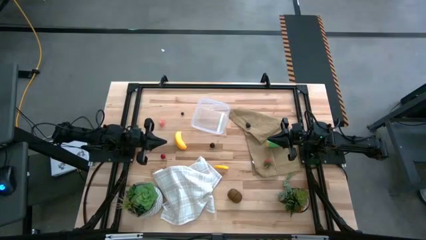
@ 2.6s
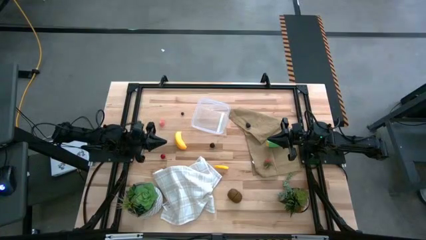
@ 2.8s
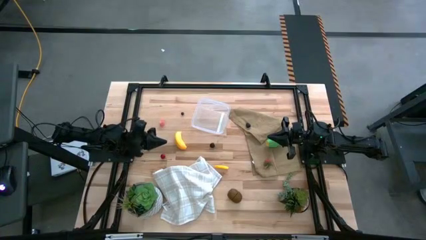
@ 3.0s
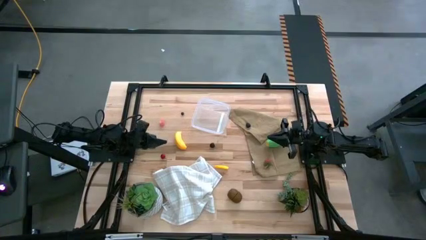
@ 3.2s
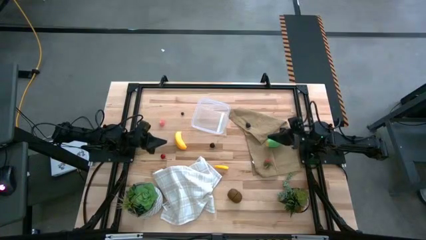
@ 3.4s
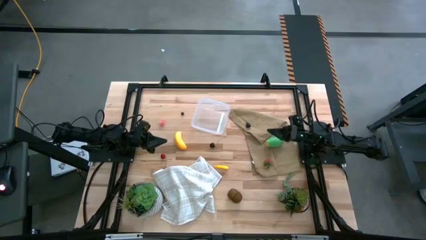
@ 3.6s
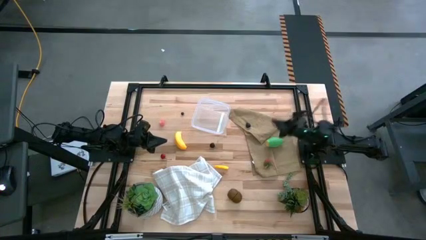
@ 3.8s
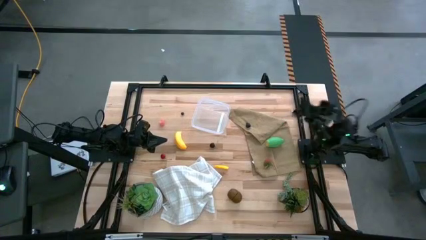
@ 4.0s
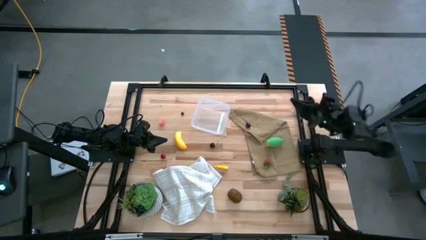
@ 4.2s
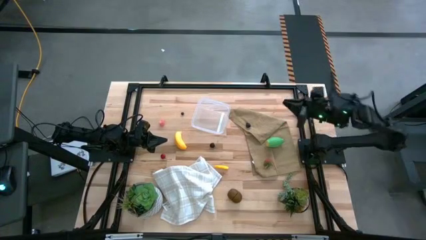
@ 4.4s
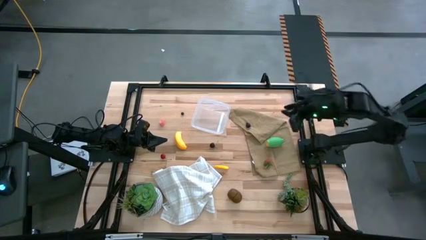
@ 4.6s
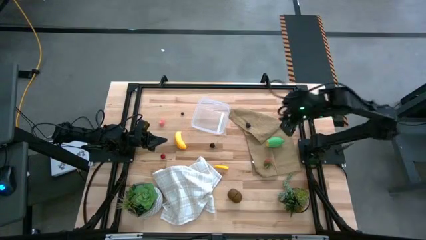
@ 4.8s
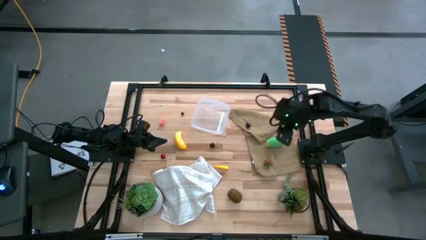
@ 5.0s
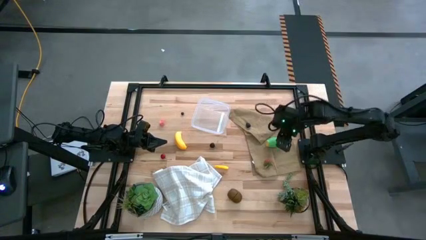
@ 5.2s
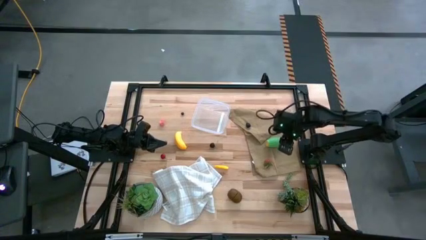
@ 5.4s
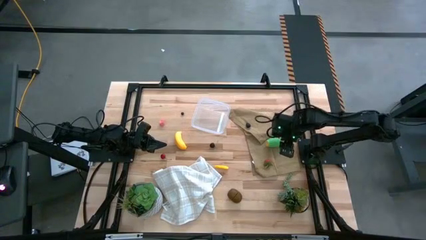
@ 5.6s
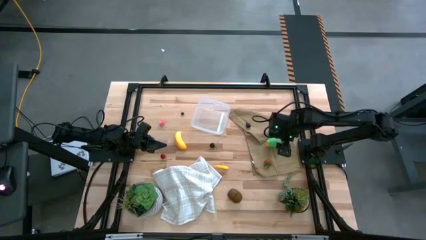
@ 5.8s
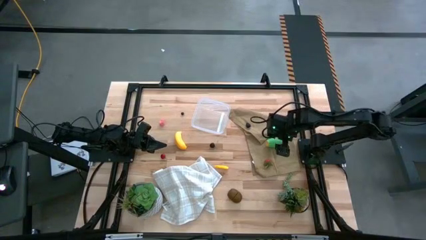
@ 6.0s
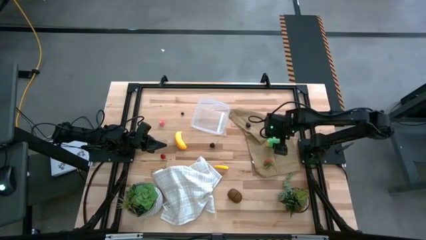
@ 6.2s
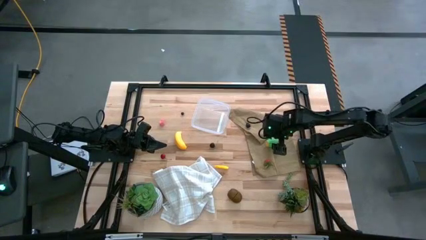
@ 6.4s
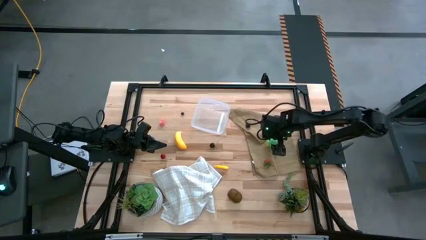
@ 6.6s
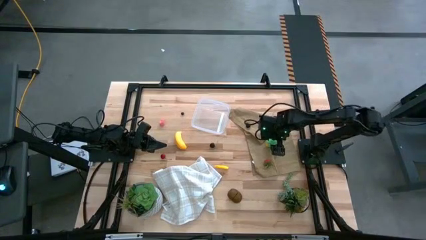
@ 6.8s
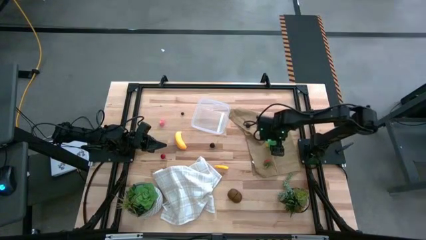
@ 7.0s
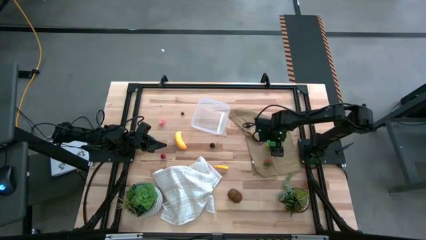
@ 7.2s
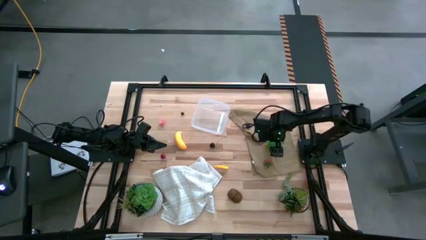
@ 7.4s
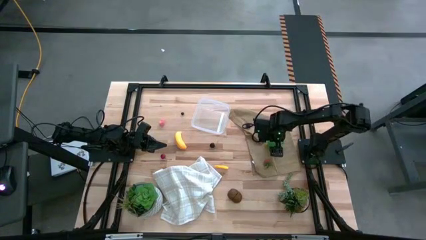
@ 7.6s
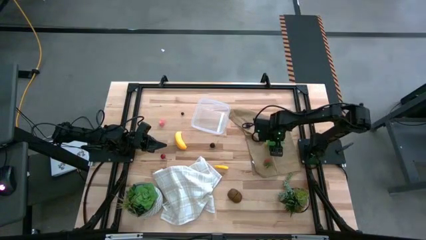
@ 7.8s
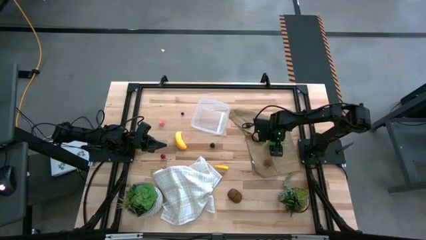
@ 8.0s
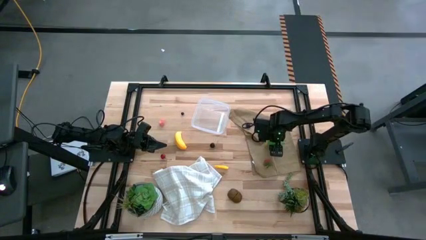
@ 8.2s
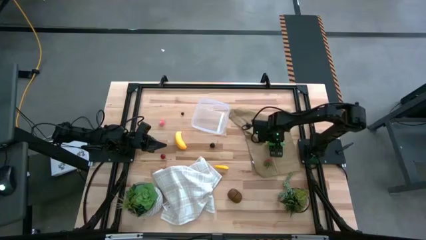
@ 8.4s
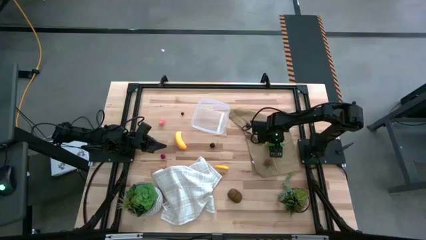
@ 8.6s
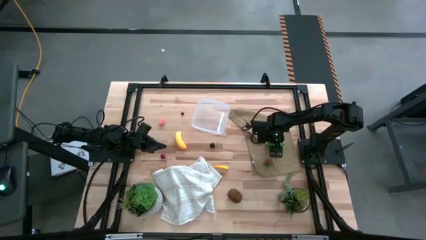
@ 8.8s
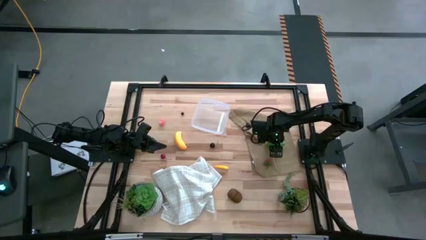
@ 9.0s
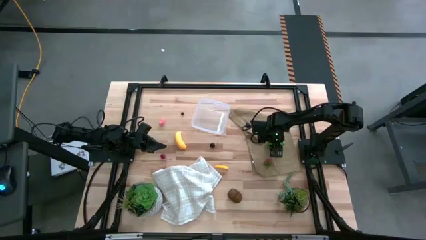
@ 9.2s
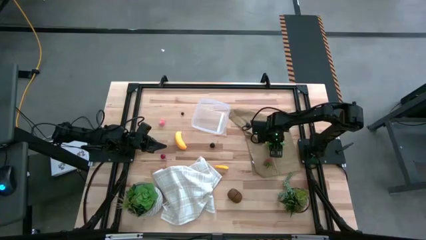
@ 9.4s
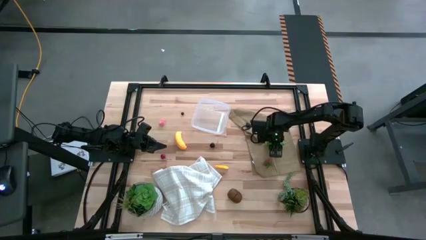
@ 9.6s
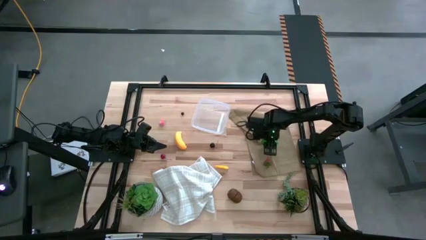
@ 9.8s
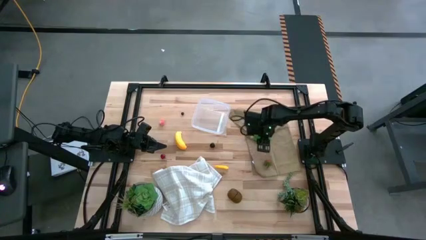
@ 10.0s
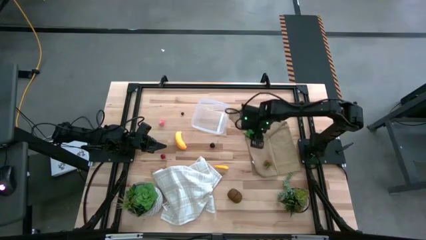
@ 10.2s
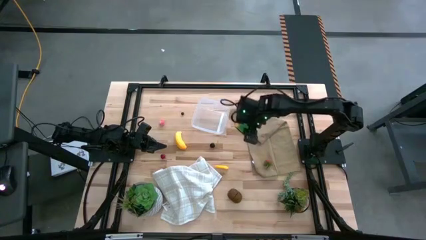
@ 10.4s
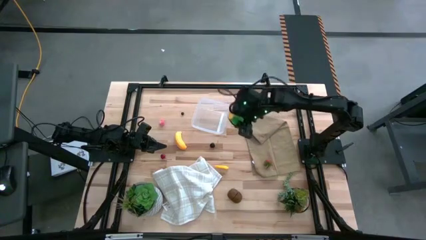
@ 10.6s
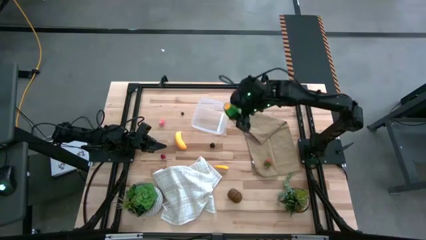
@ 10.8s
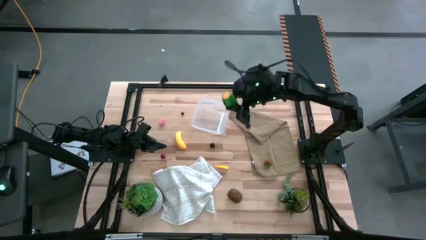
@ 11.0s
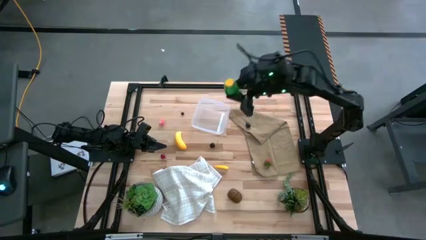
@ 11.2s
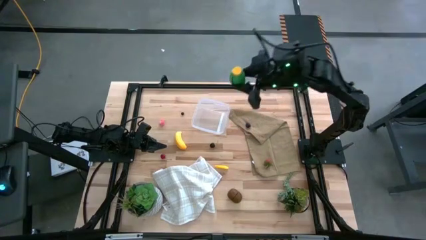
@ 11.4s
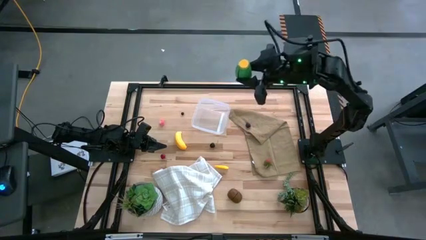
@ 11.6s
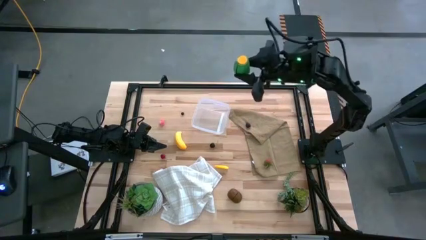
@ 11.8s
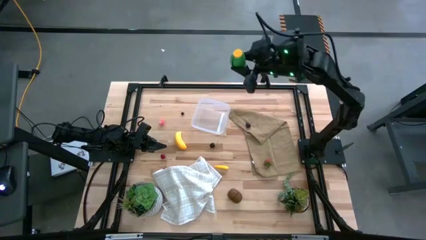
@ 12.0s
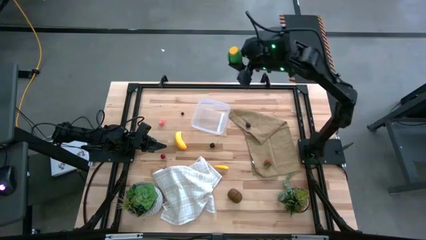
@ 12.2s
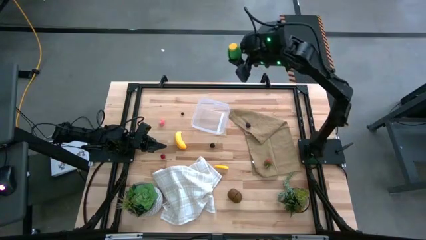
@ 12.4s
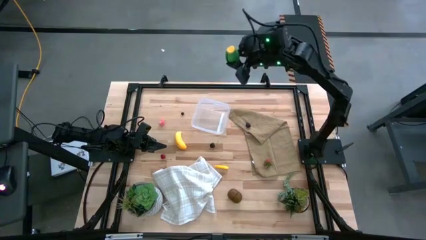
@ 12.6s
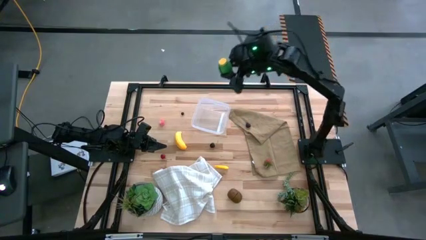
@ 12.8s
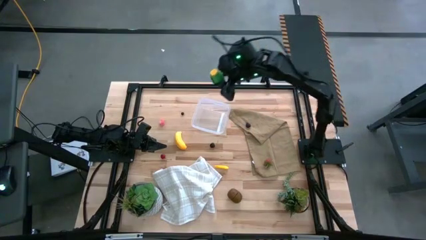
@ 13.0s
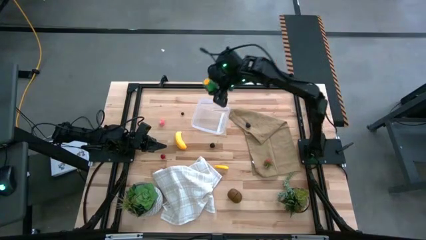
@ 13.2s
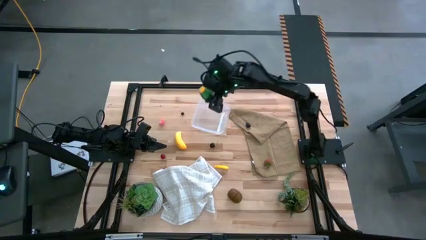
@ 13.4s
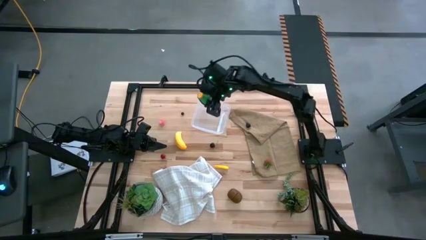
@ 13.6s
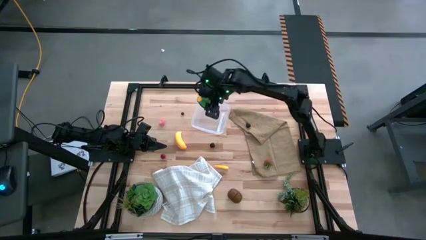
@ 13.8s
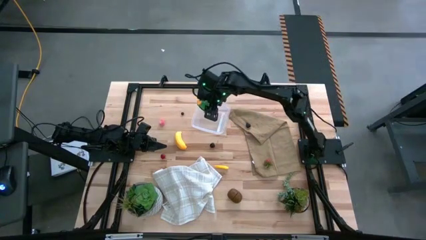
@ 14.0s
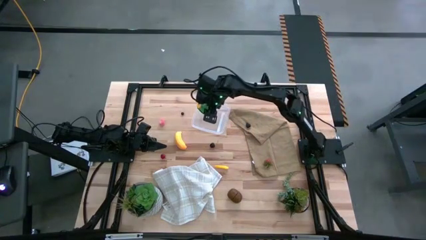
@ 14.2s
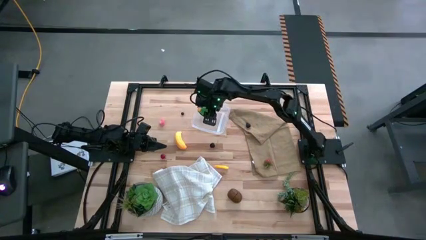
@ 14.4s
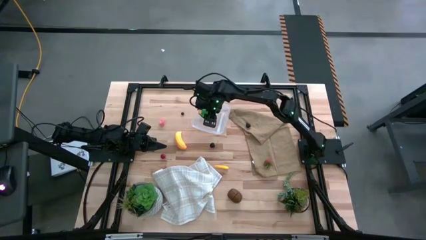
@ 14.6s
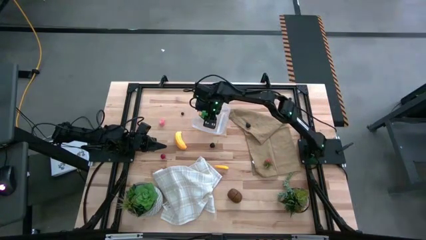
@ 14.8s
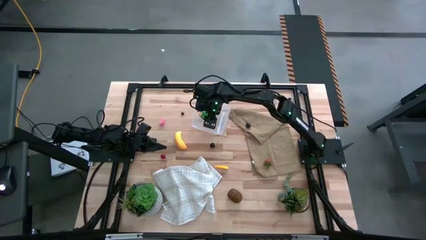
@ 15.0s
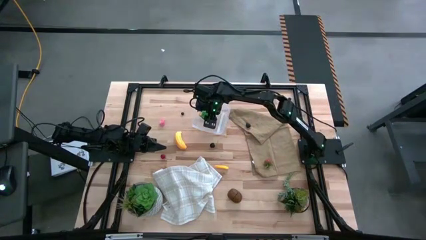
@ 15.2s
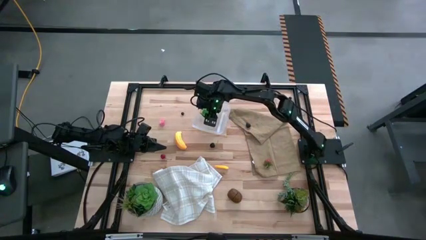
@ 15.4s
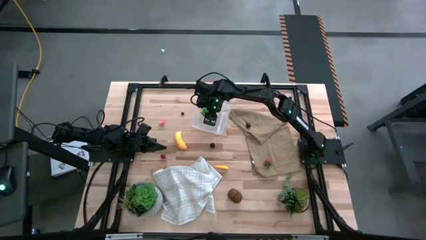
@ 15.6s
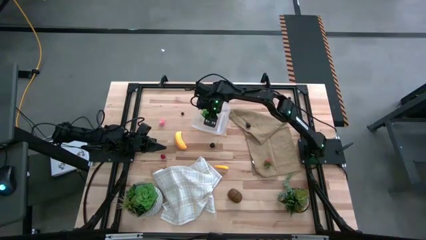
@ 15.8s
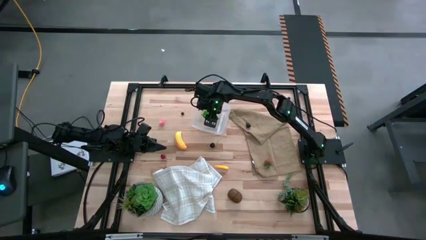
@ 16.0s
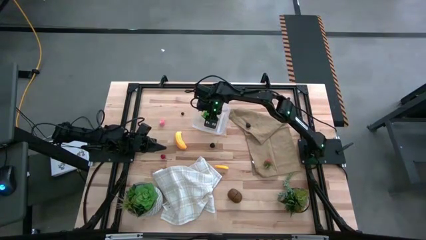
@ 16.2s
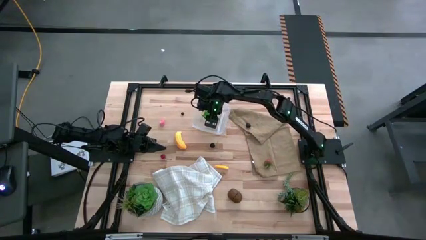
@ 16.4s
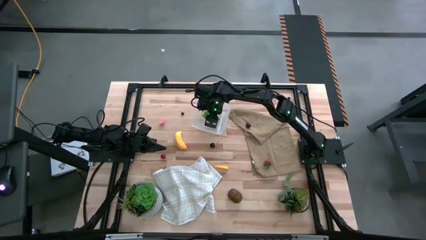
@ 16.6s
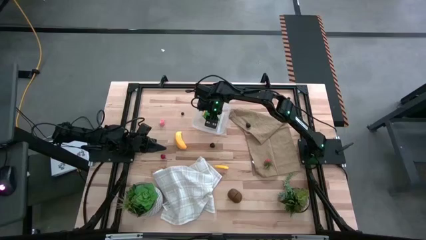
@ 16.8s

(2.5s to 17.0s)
Task: Pick and placing Produce into tupperware
Put the green corn into the transparent bin
